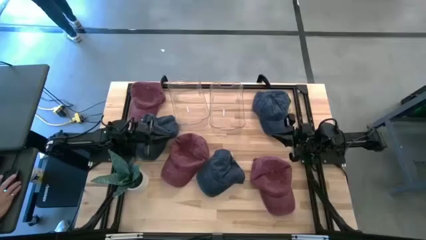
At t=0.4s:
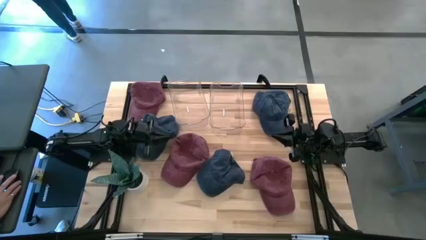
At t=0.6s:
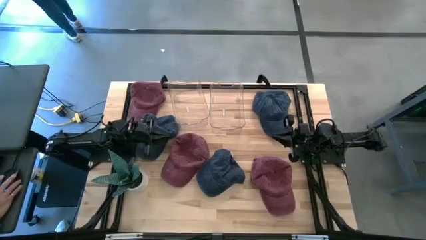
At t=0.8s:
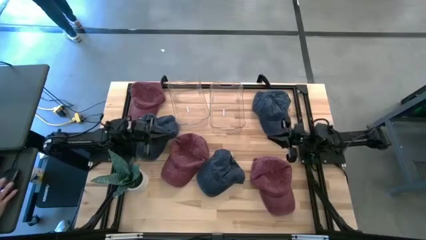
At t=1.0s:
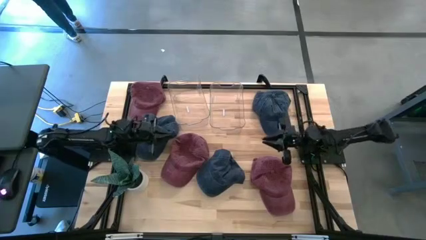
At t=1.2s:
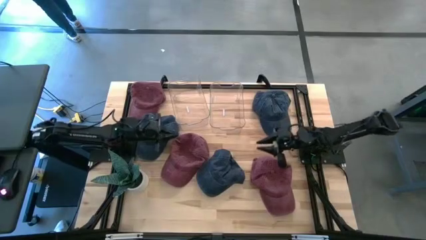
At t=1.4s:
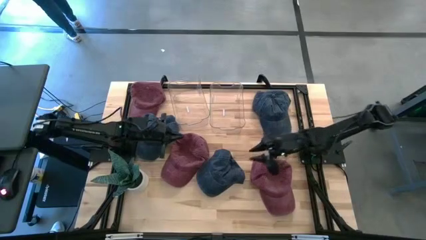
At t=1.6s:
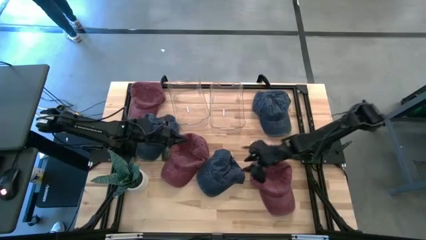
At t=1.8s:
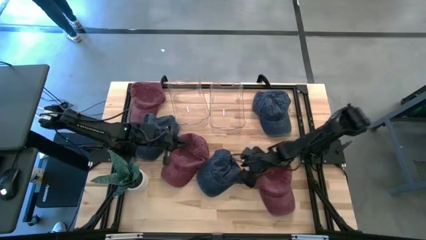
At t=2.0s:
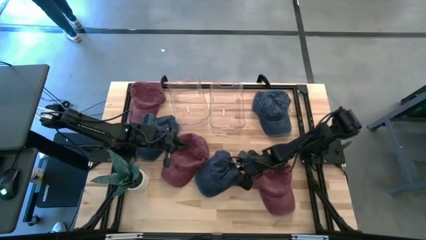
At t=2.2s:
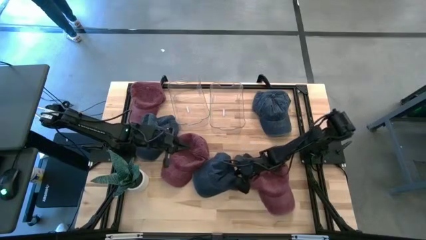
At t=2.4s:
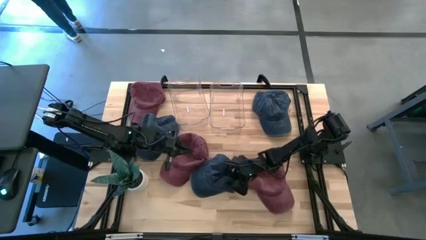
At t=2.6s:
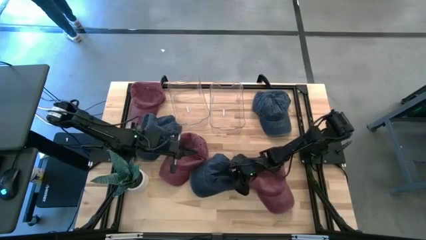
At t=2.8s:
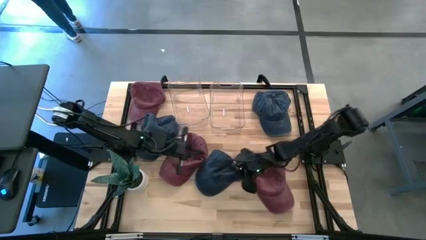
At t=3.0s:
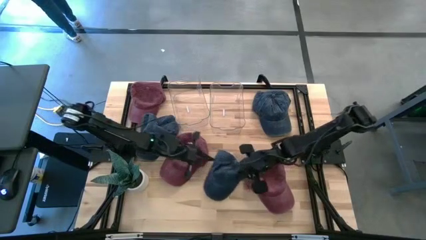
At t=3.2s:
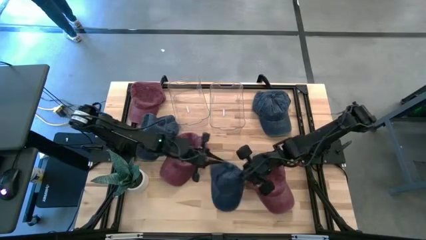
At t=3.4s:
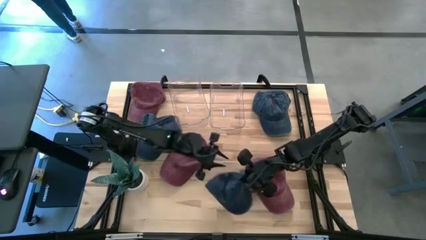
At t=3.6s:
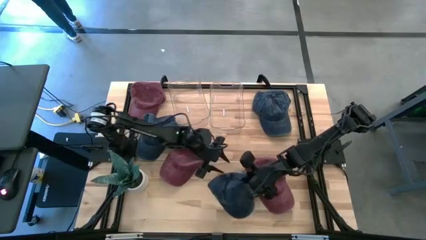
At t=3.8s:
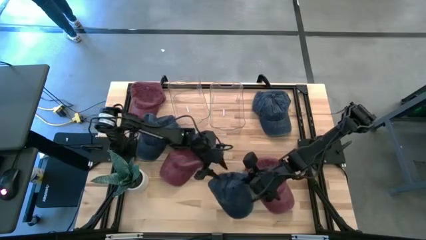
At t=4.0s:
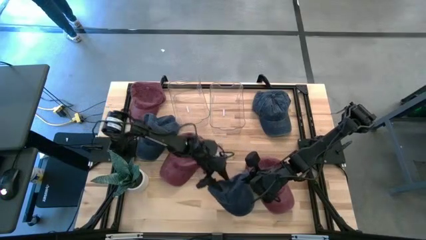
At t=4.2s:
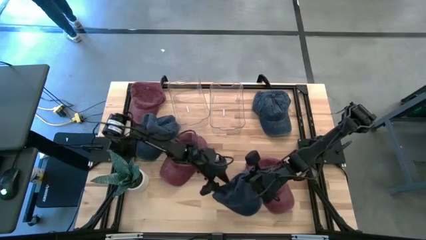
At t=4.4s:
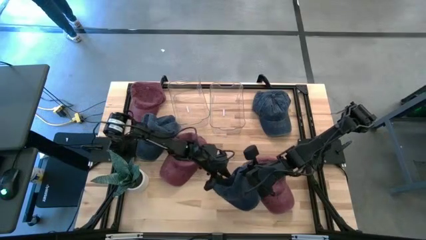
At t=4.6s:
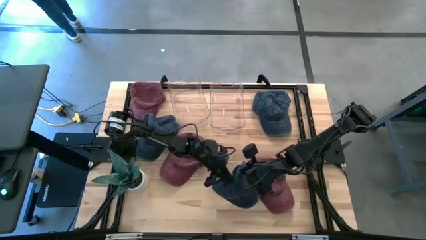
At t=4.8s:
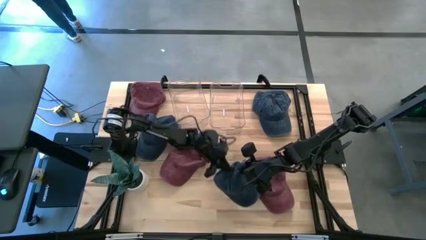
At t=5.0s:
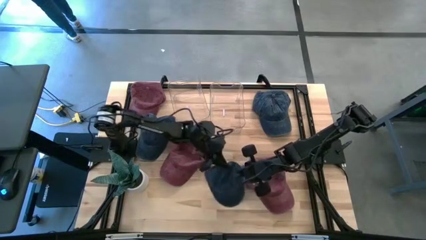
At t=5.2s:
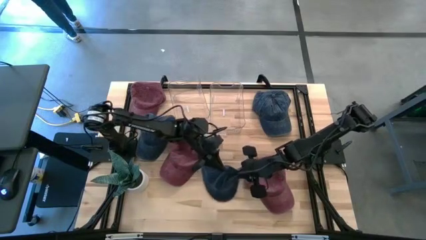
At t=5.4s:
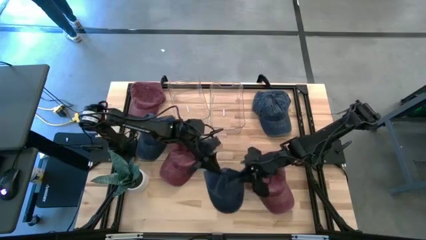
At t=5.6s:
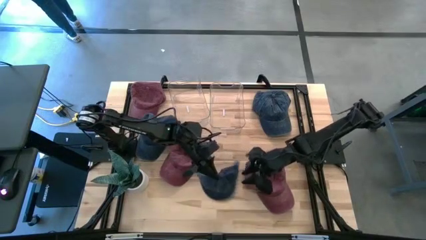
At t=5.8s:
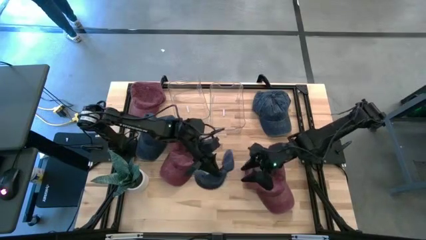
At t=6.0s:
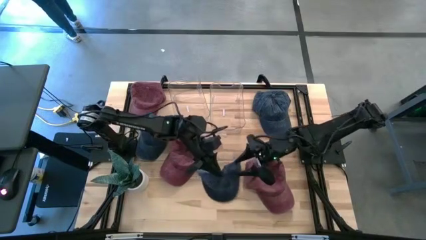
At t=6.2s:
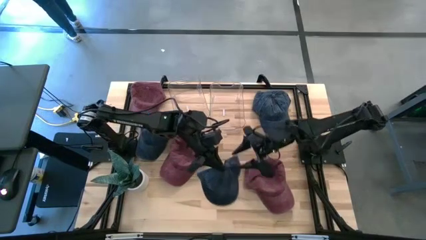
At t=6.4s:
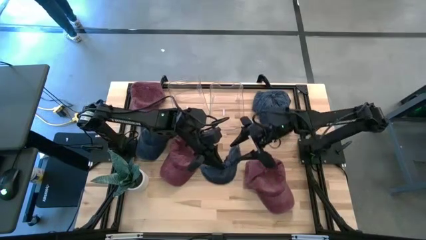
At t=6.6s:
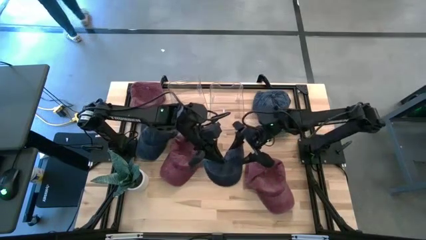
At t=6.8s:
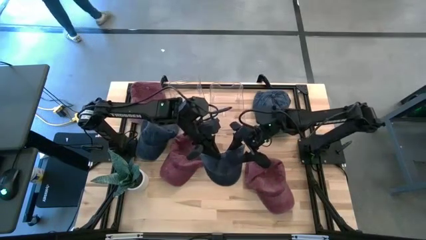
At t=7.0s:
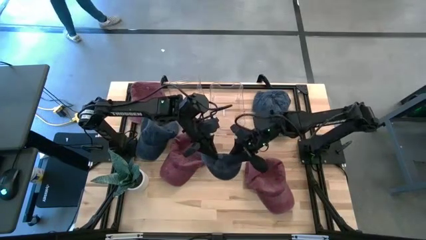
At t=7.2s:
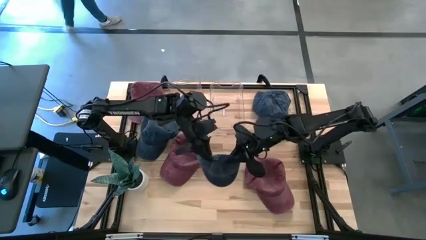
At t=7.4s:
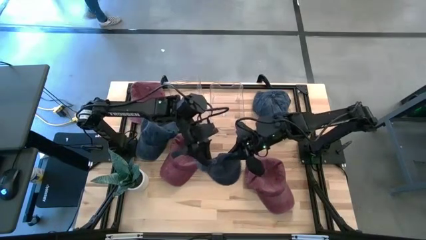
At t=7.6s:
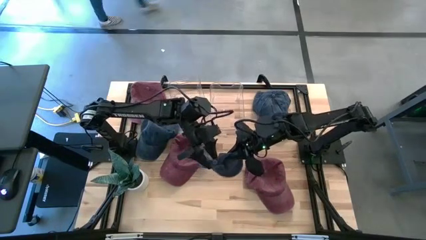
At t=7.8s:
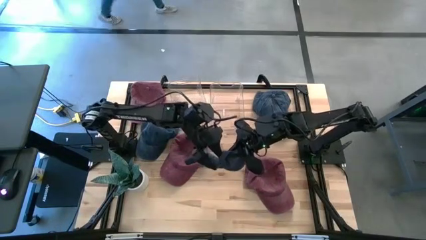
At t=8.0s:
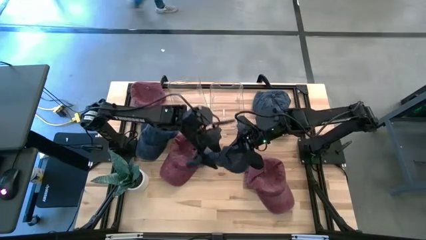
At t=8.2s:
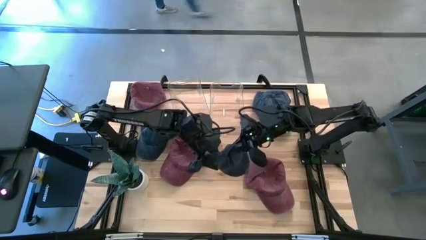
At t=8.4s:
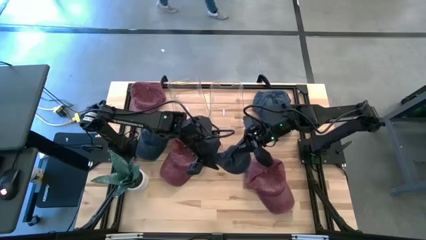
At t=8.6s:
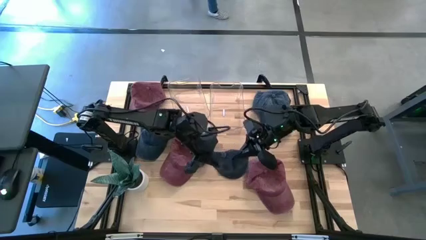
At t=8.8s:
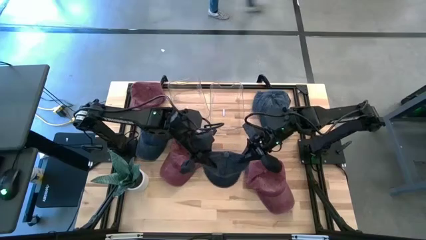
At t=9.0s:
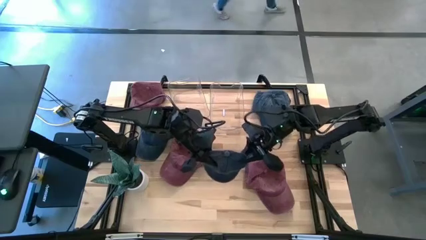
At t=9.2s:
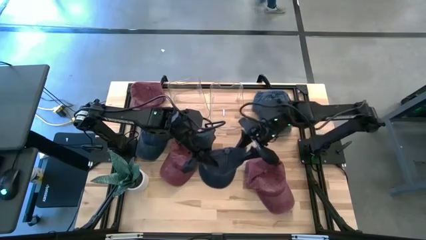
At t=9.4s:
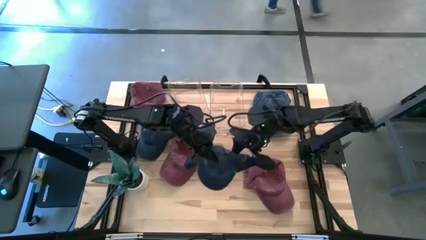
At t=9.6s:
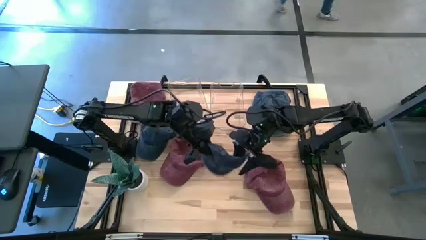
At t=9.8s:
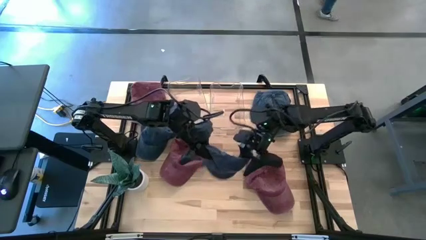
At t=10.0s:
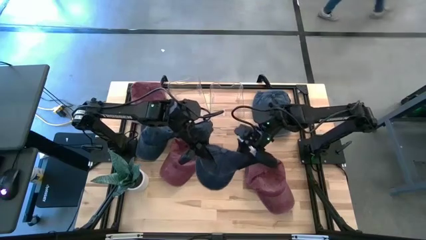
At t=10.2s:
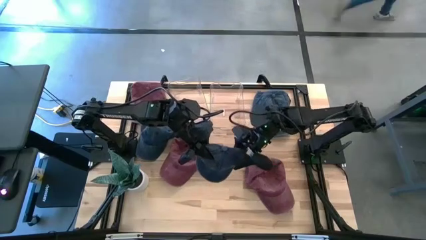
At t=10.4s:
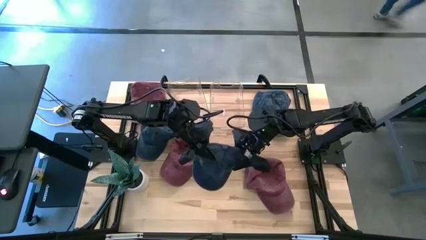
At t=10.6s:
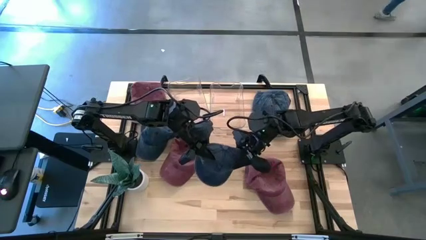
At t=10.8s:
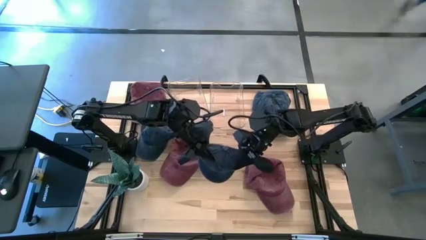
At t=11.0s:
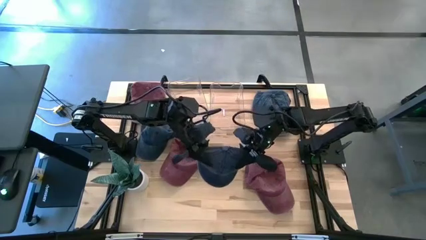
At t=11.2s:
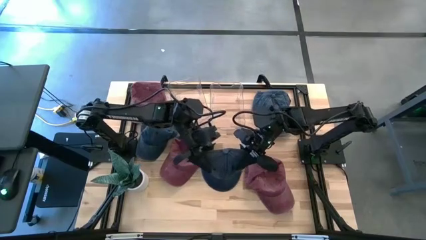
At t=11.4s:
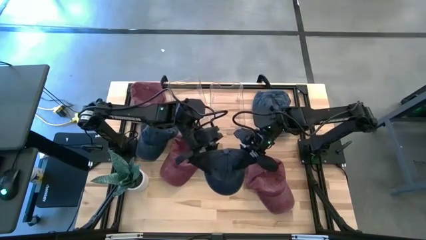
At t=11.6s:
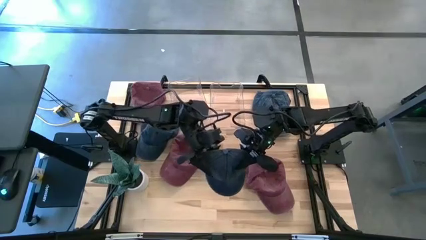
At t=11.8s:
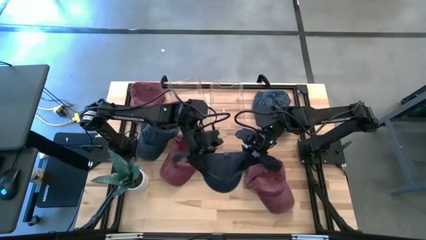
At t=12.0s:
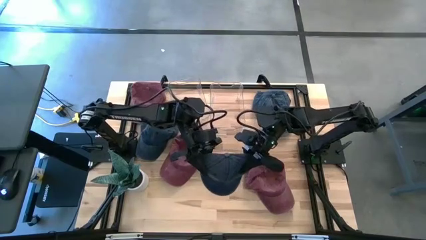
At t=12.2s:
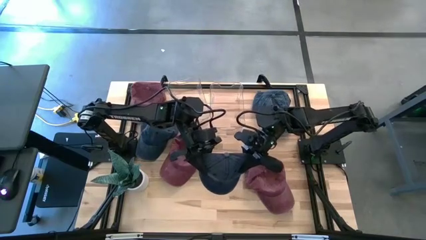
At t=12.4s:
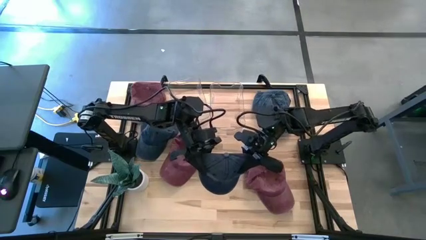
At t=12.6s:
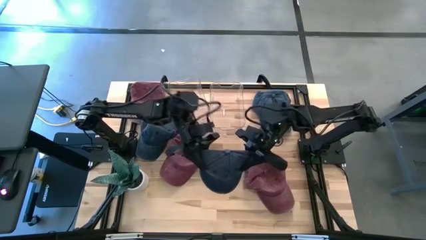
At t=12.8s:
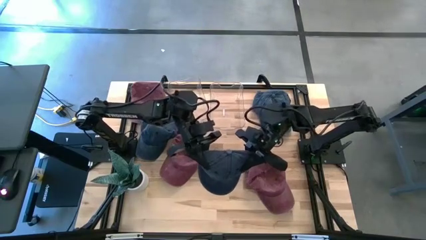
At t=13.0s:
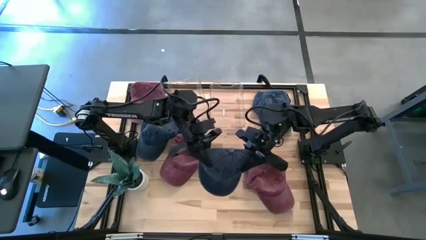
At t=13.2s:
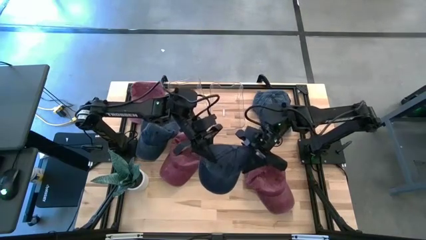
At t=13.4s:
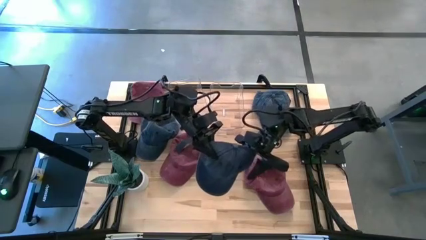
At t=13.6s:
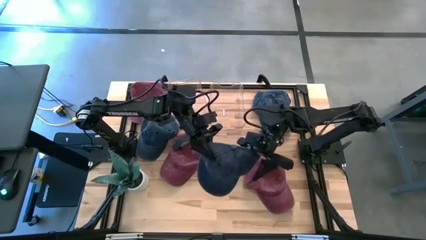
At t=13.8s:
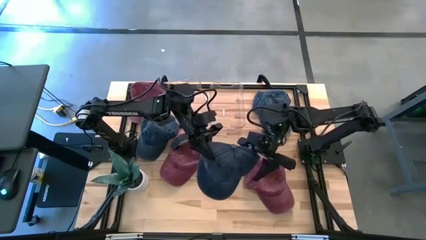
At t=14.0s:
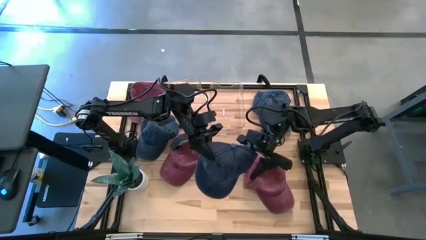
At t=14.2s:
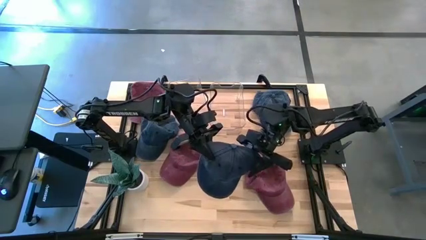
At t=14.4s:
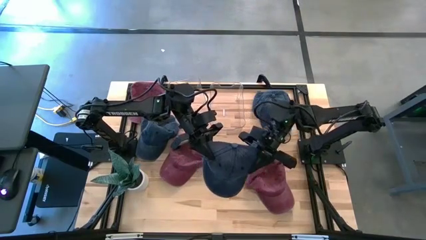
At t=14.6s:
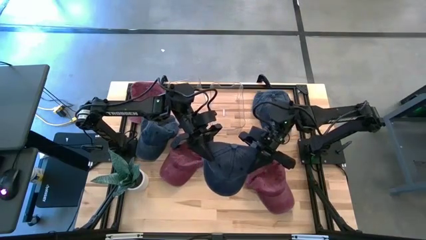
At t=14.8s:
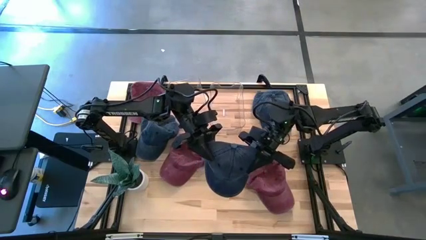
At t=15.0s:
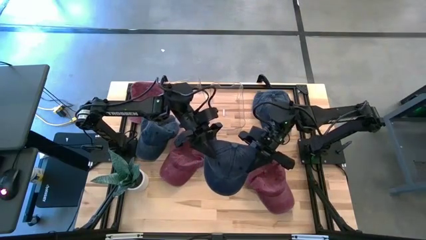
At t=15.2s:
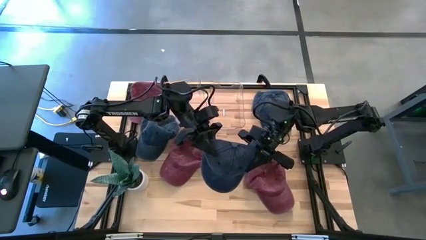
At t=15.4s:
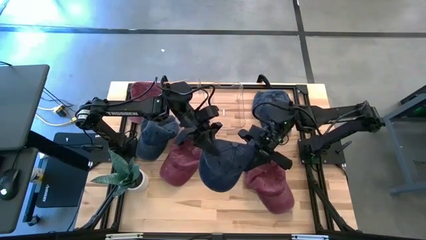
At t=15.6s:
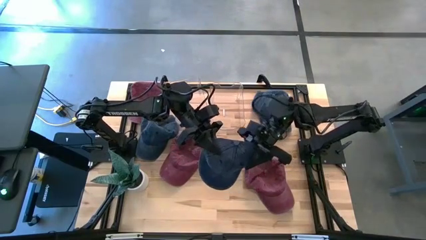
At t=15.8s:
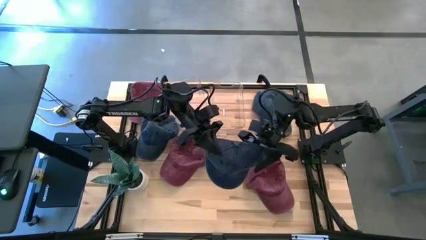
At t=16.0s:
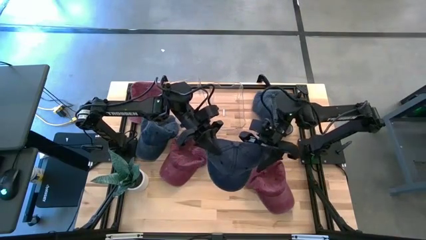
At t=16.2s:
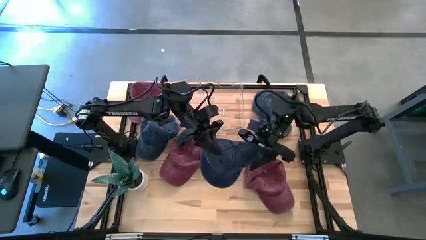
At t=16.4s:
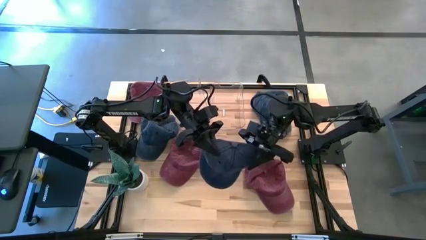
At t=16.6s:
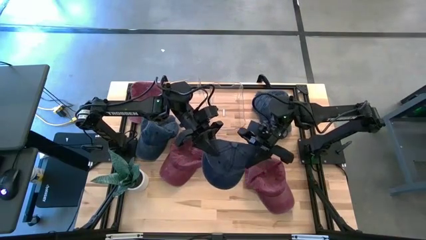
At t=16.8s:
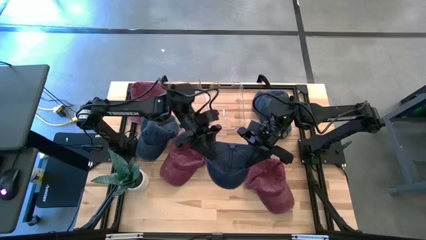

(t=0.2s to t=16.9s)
Task: Pick & Place hat
Put the bottom blue cap into the right bin
